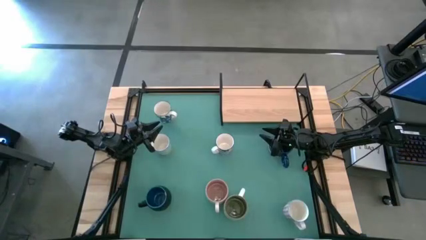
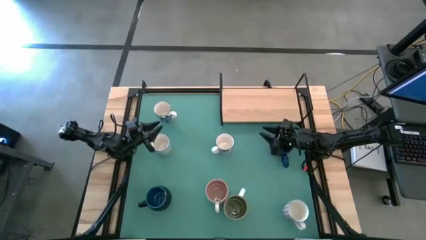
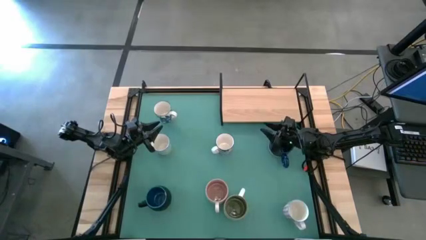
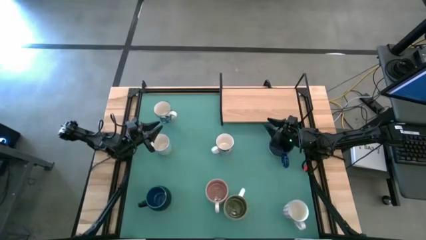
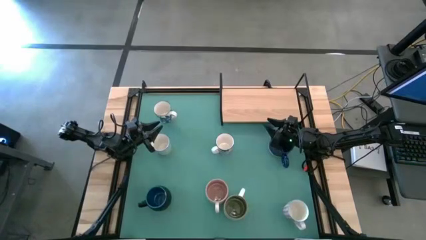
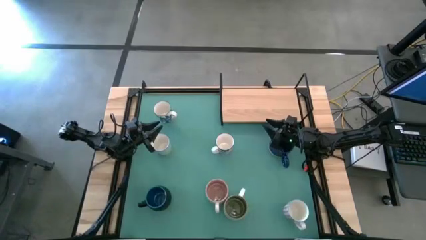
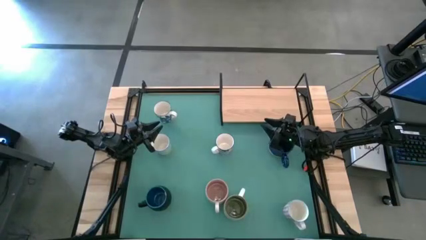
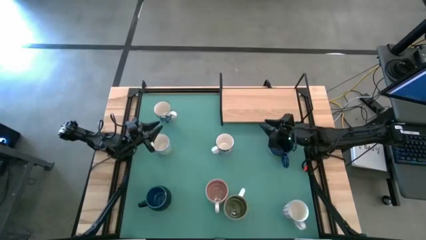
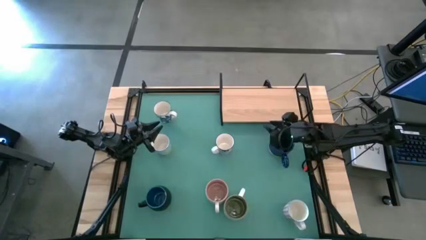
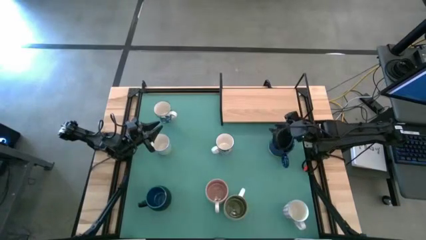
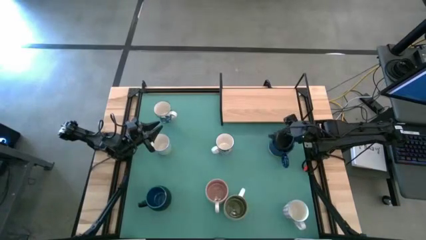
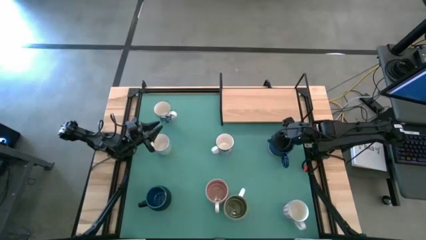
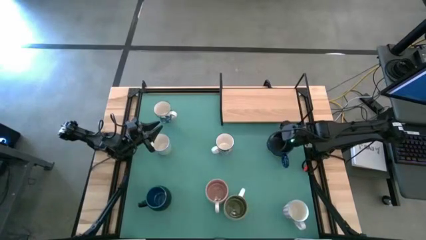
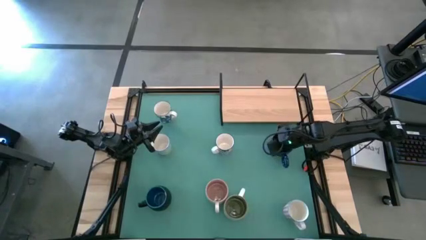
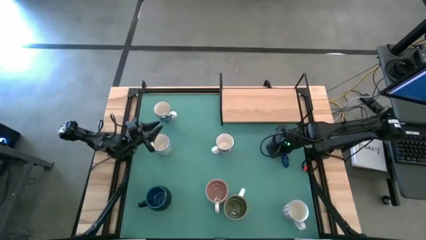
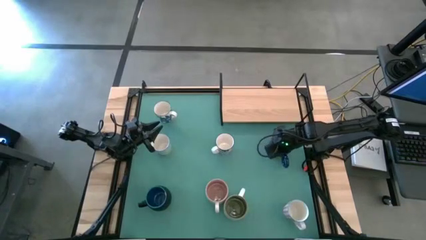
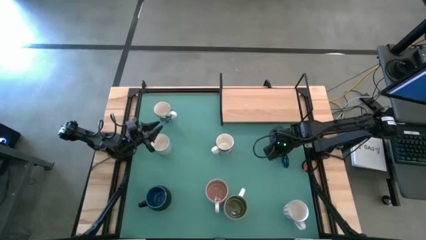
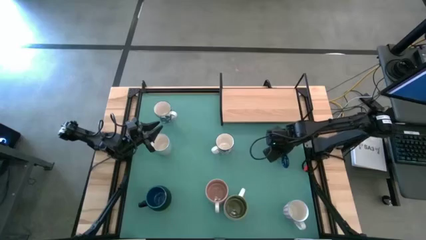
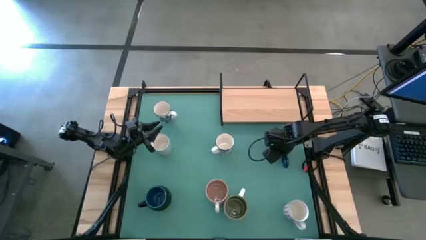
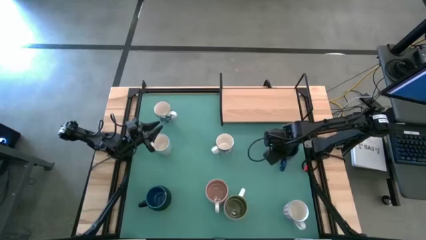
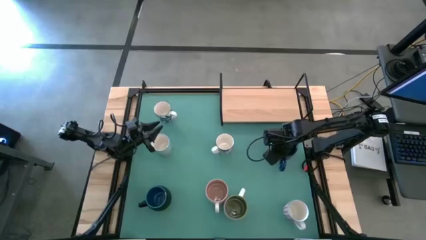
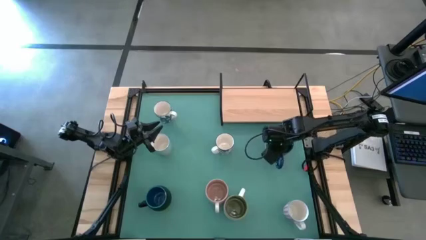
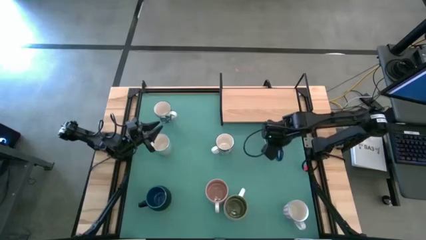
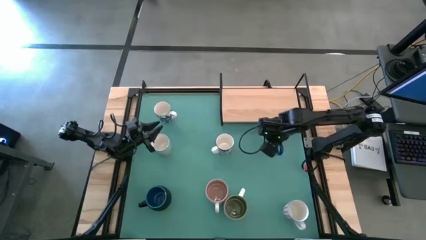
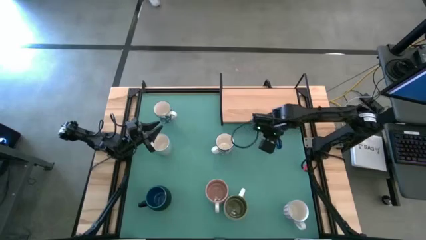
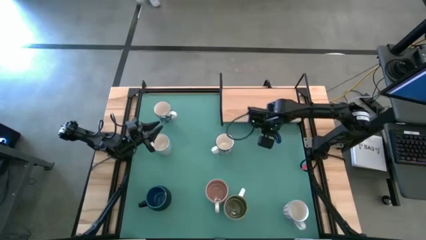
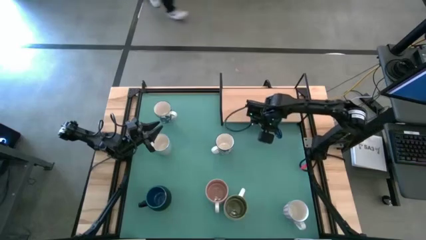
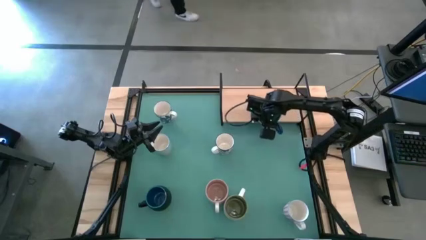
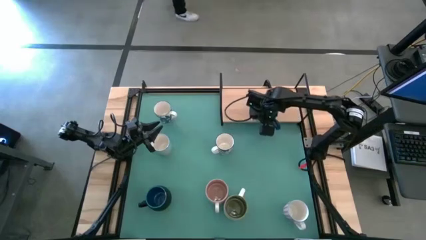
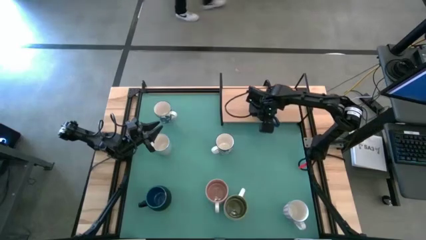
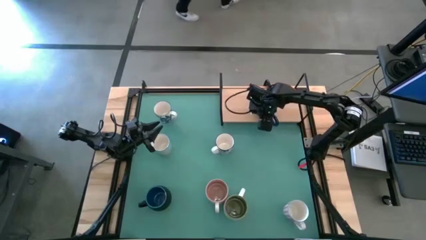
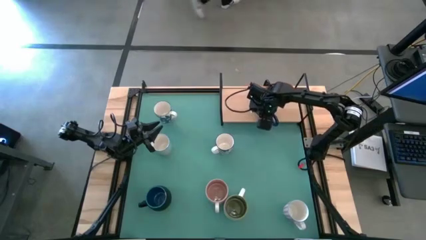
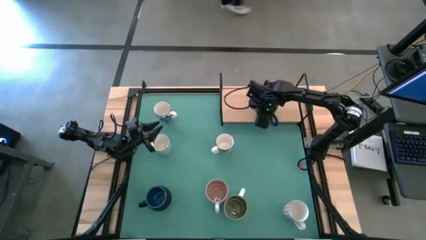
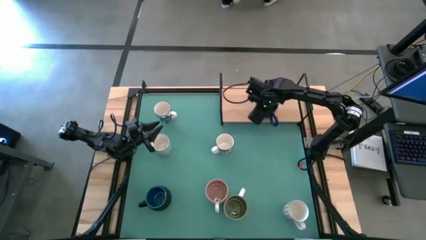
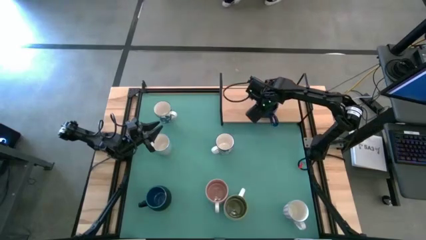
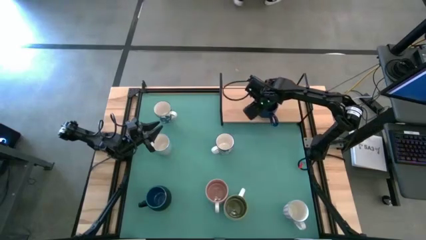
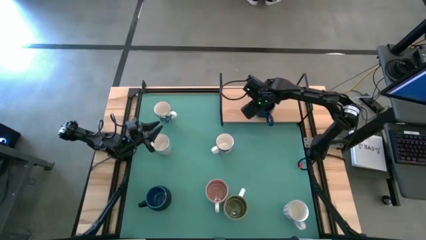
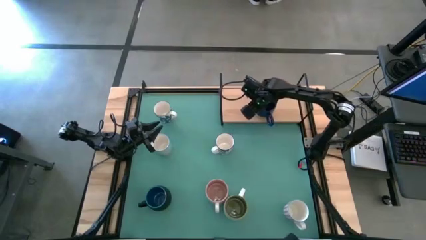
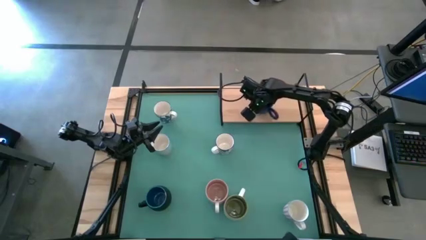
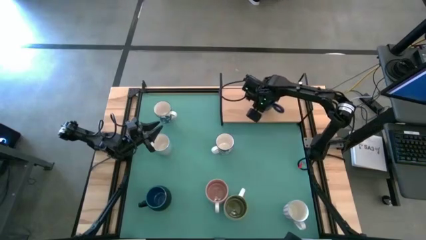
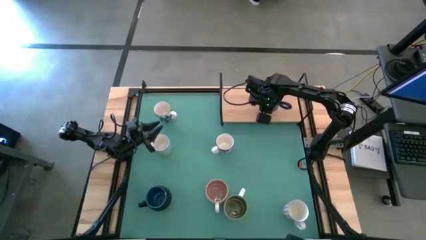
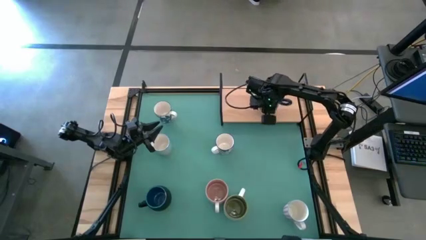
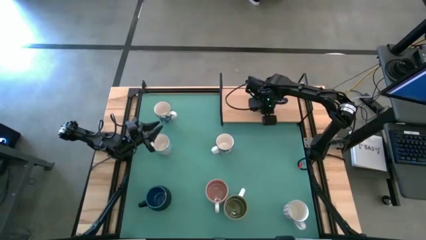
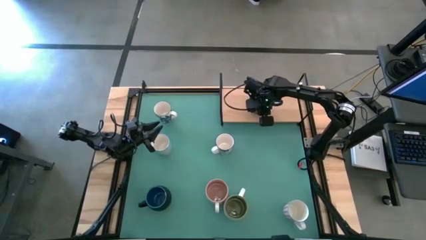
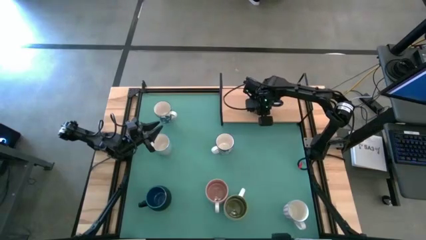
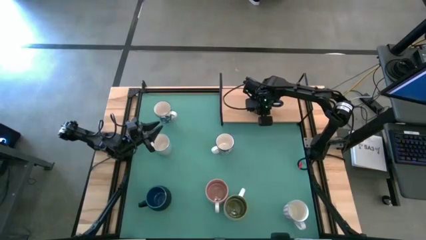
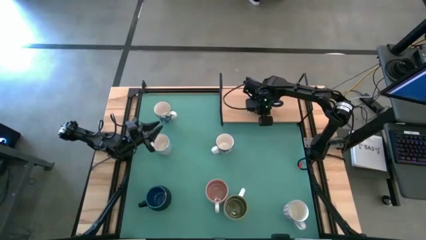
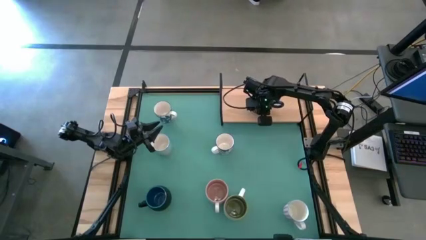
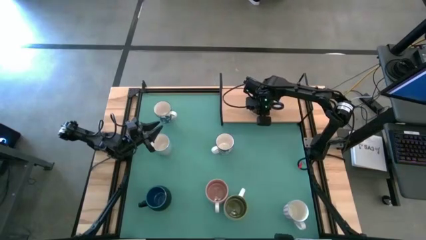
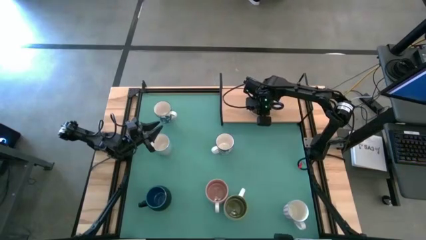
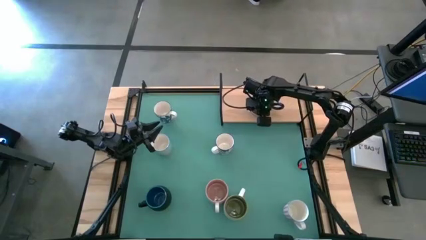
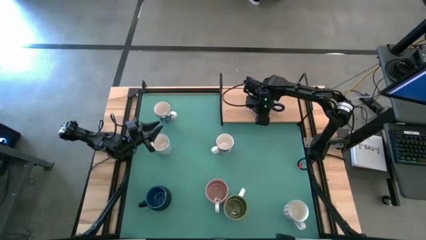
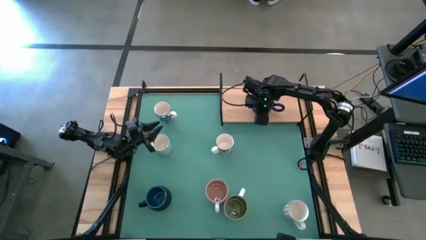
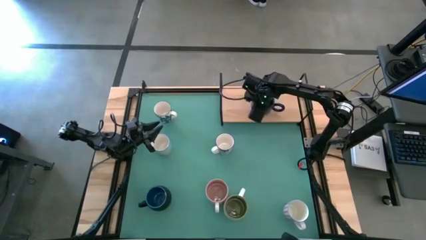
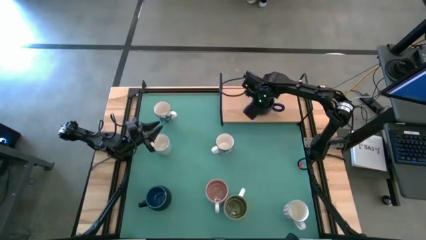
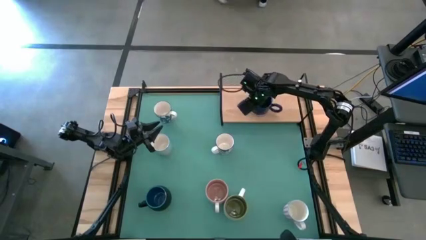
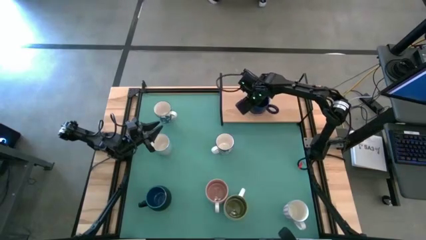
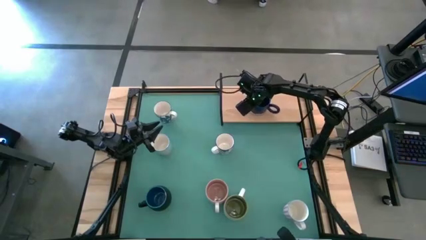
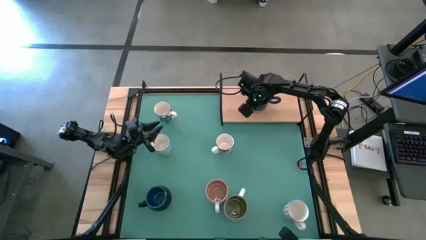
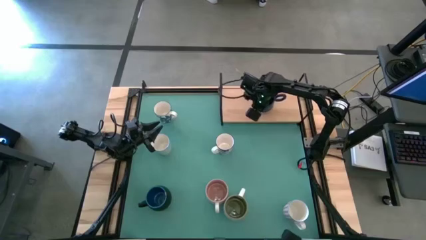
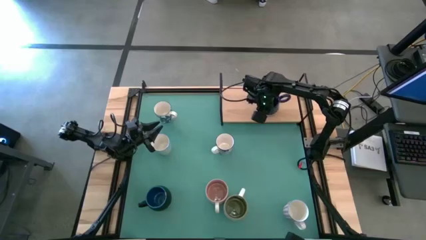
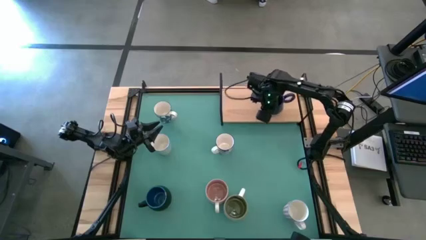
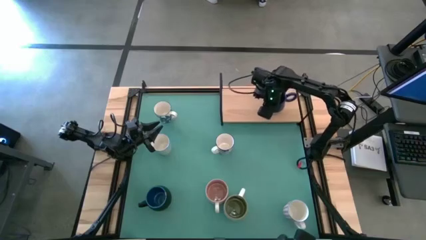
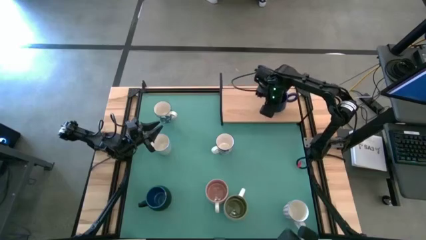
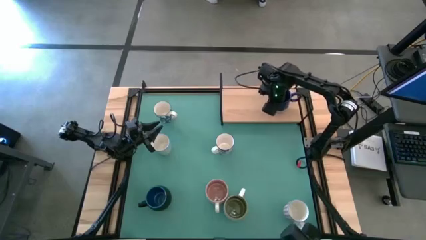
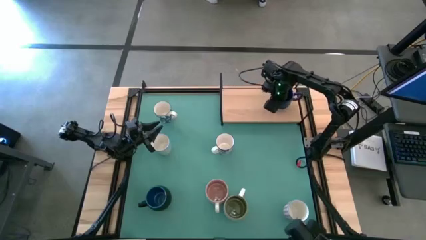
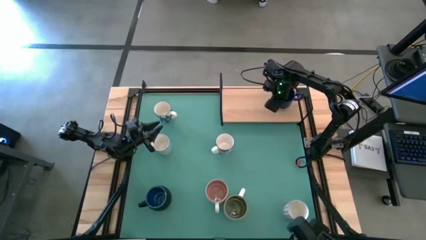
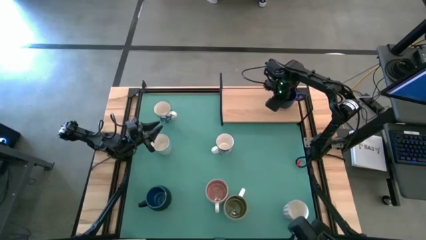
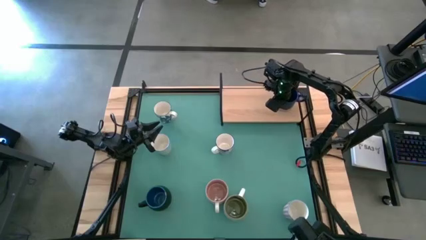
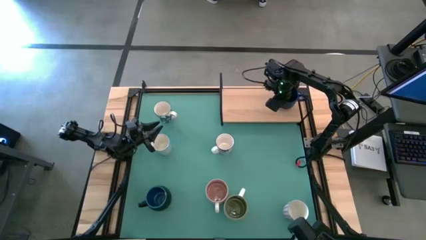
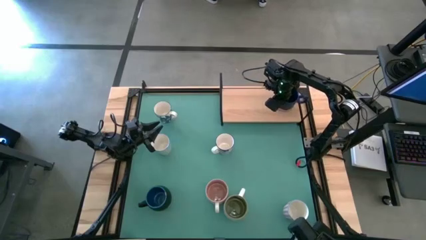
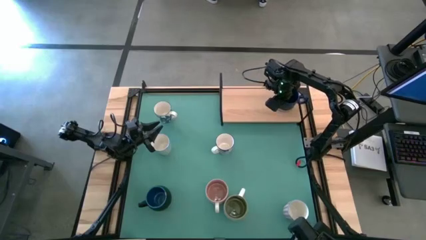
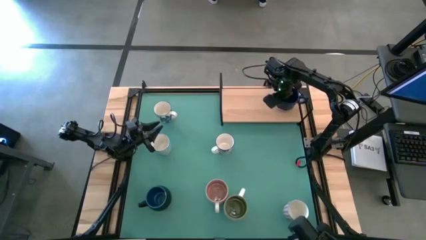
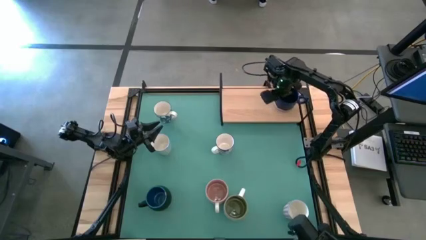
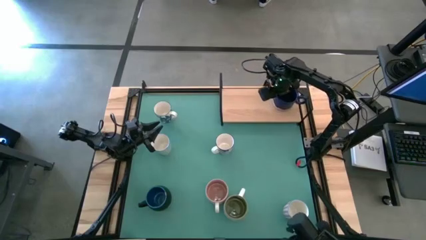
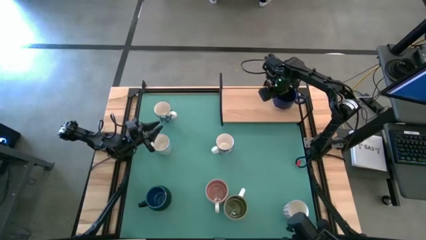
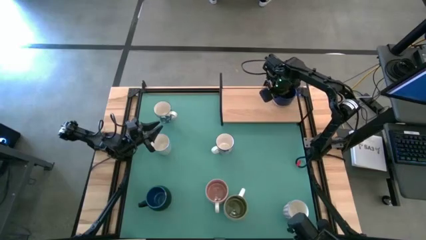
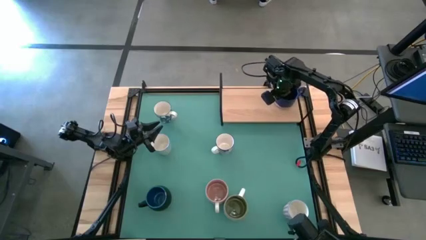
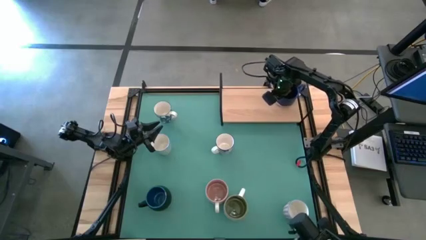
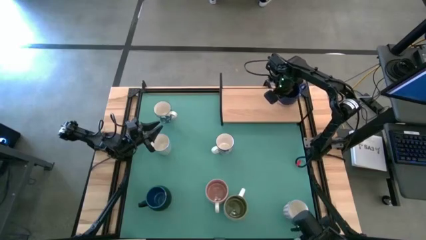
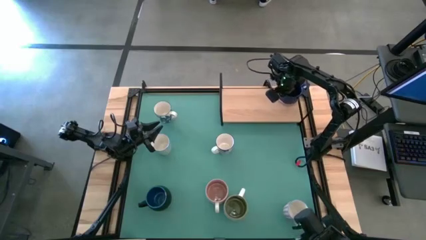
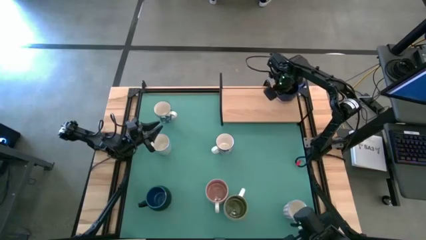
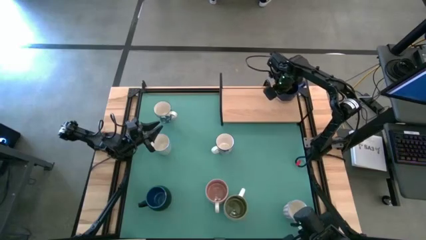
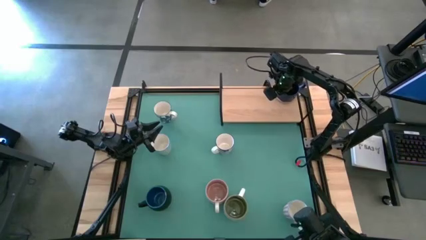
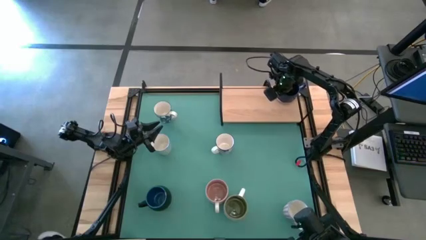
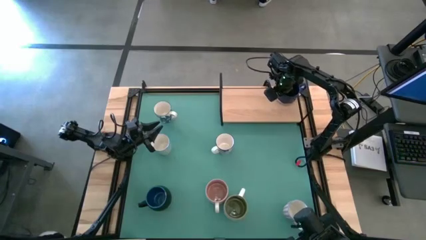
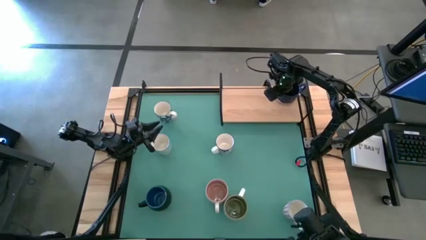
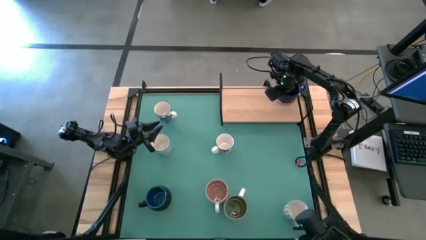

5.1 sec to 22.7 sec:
Task: Place coffee mugs
Put the blue mug on the shelf
